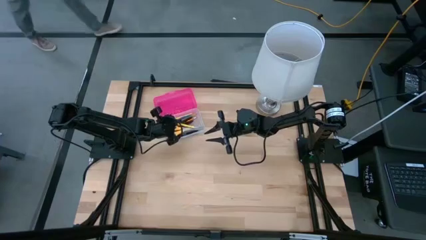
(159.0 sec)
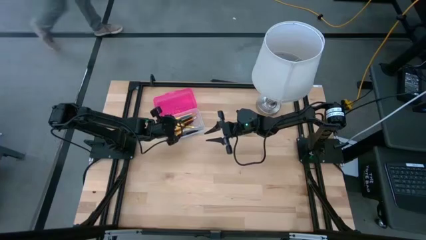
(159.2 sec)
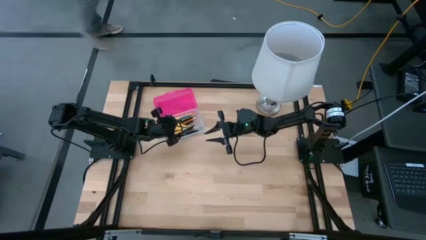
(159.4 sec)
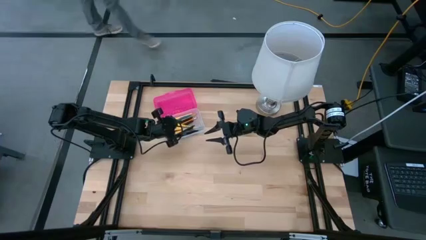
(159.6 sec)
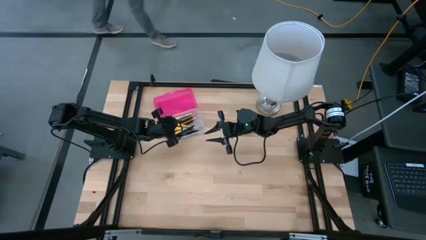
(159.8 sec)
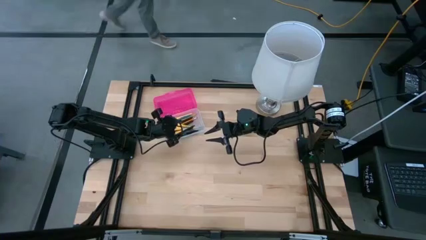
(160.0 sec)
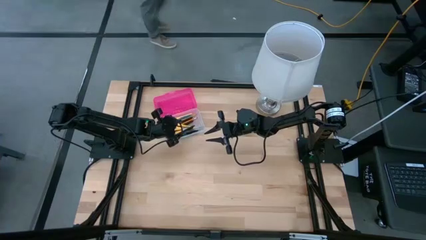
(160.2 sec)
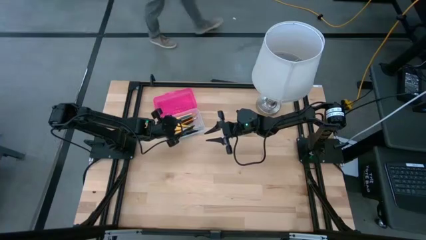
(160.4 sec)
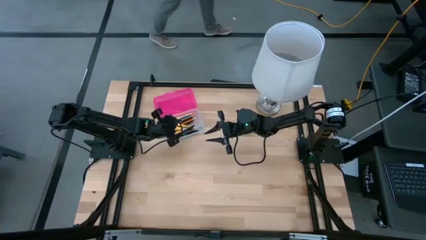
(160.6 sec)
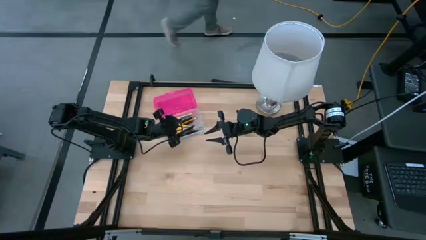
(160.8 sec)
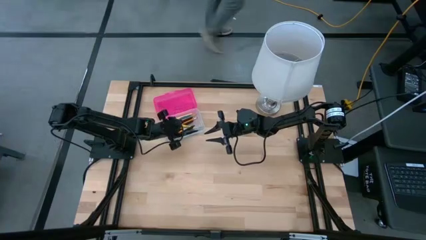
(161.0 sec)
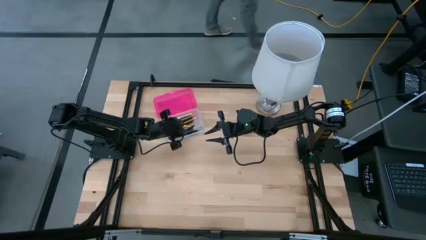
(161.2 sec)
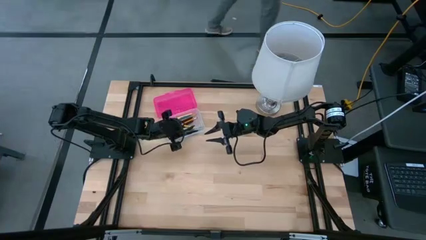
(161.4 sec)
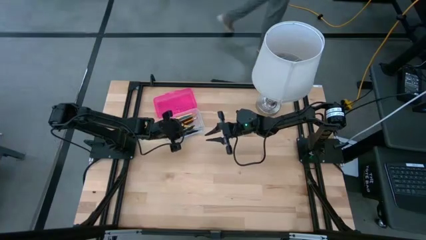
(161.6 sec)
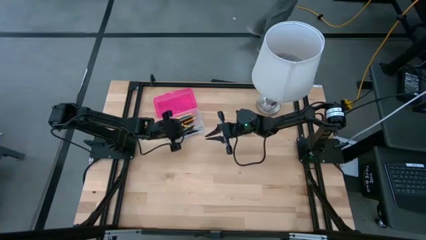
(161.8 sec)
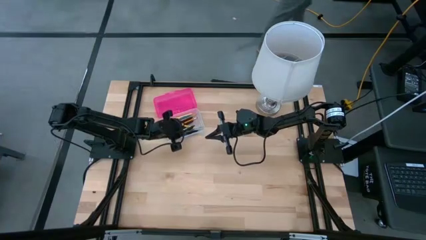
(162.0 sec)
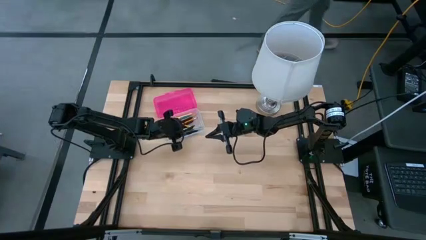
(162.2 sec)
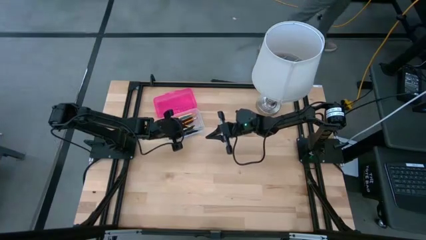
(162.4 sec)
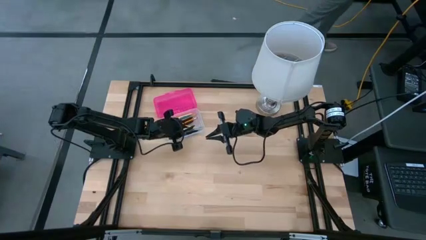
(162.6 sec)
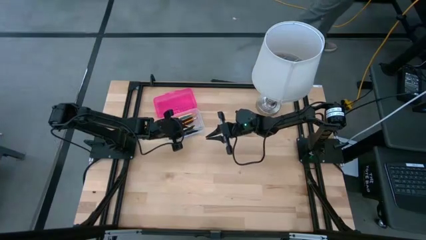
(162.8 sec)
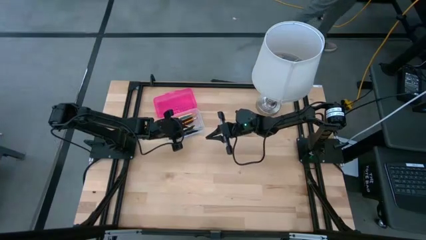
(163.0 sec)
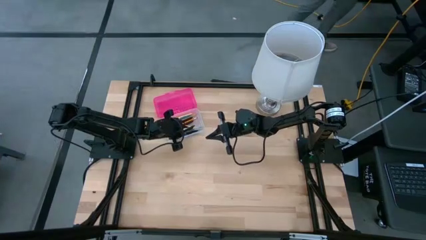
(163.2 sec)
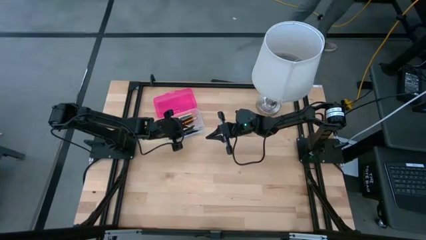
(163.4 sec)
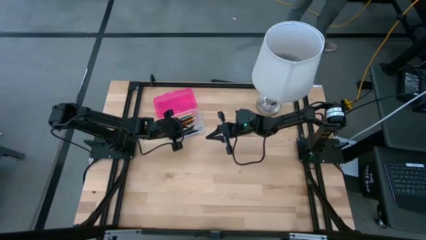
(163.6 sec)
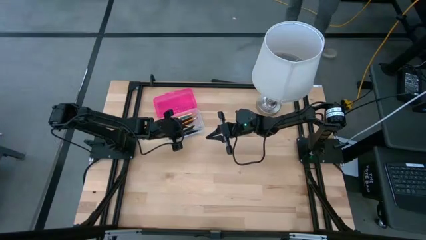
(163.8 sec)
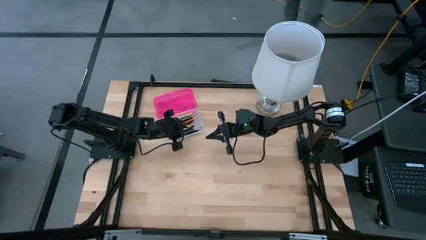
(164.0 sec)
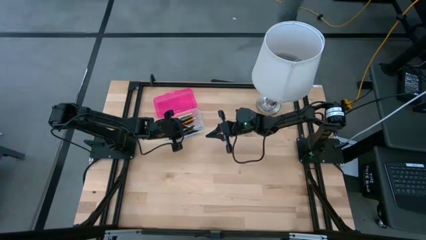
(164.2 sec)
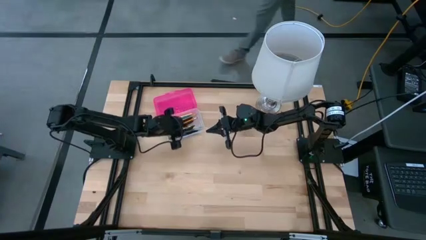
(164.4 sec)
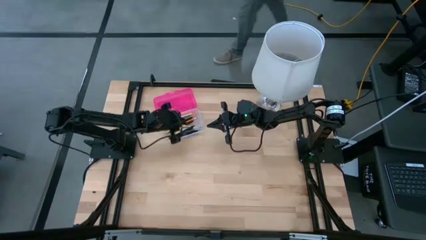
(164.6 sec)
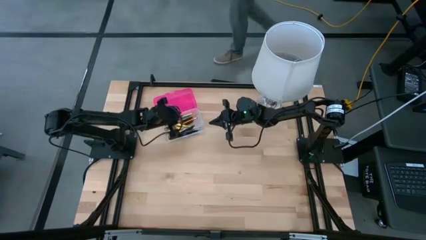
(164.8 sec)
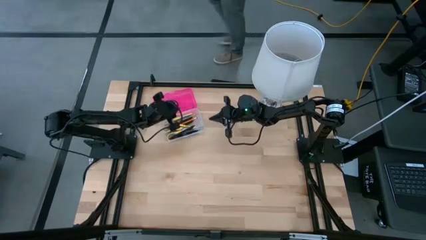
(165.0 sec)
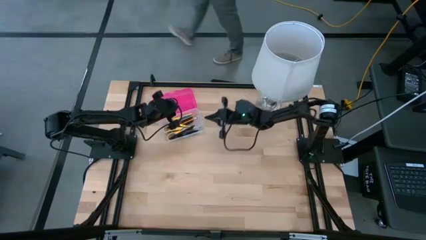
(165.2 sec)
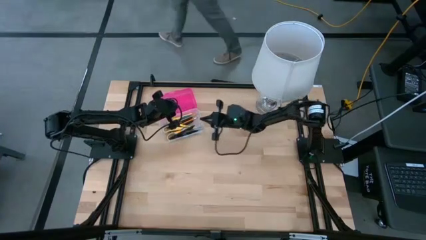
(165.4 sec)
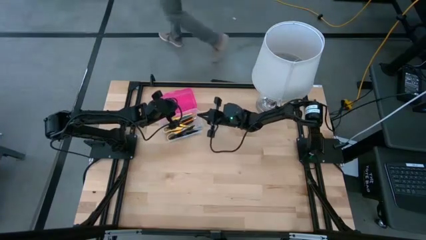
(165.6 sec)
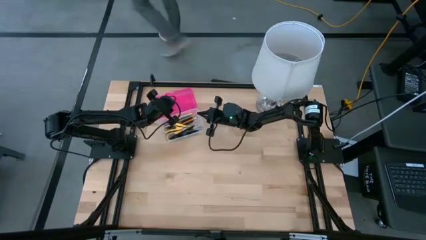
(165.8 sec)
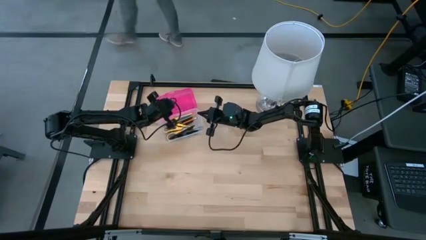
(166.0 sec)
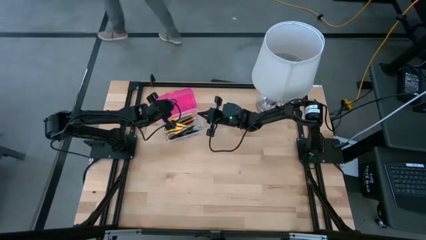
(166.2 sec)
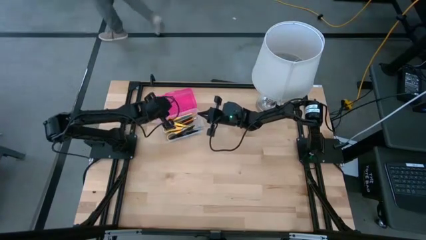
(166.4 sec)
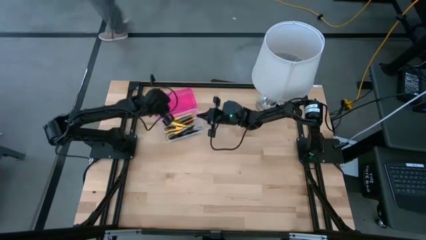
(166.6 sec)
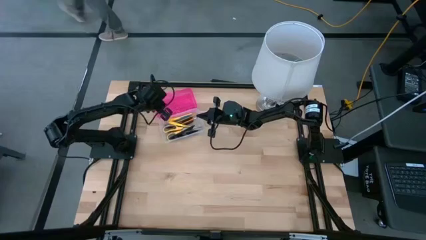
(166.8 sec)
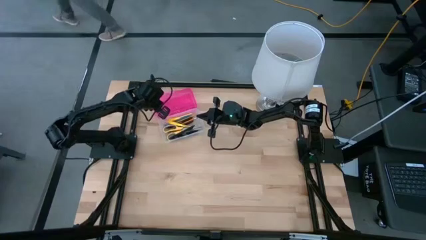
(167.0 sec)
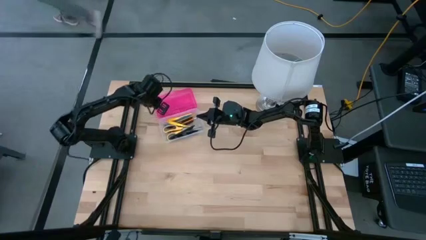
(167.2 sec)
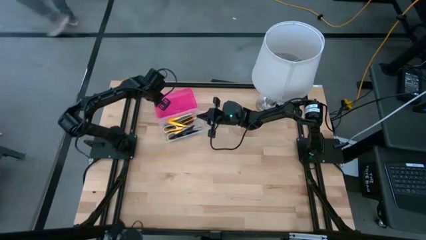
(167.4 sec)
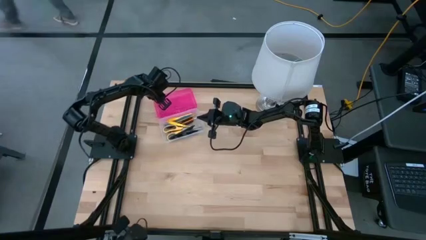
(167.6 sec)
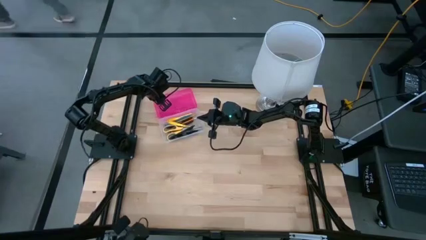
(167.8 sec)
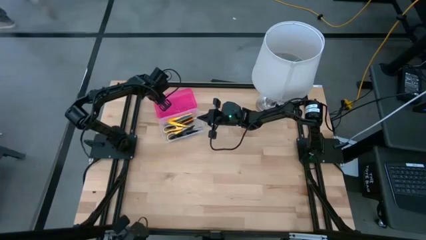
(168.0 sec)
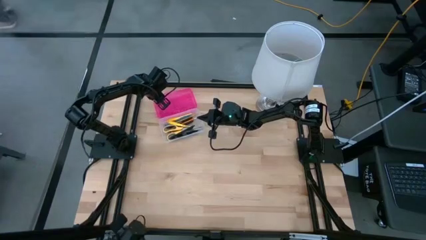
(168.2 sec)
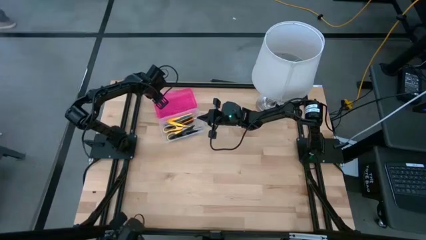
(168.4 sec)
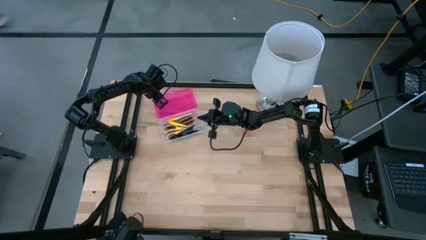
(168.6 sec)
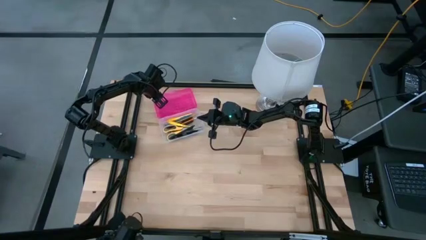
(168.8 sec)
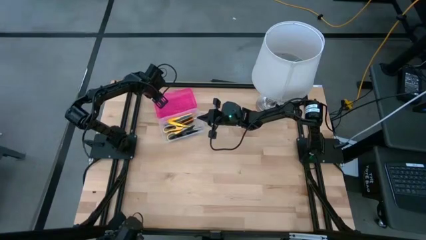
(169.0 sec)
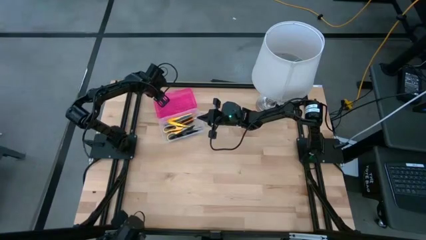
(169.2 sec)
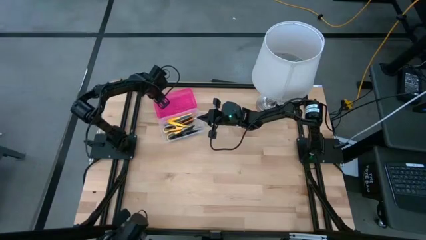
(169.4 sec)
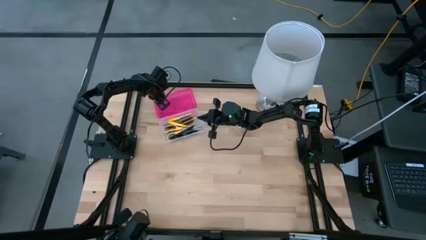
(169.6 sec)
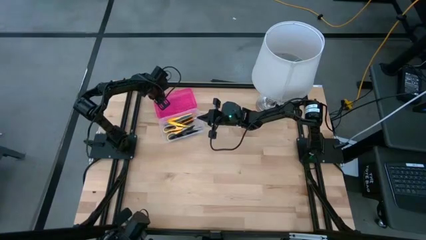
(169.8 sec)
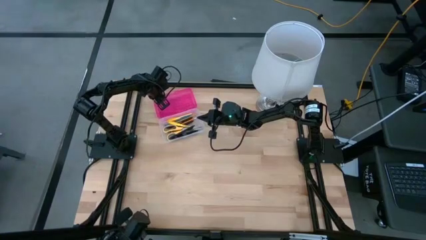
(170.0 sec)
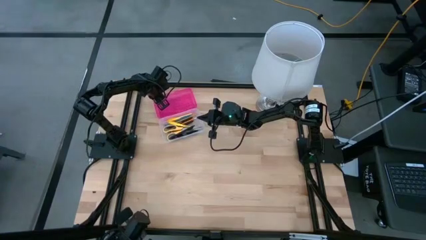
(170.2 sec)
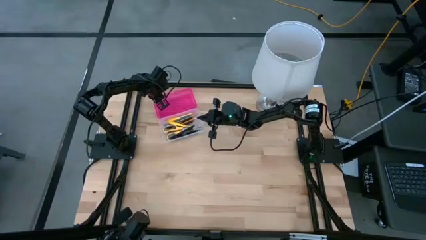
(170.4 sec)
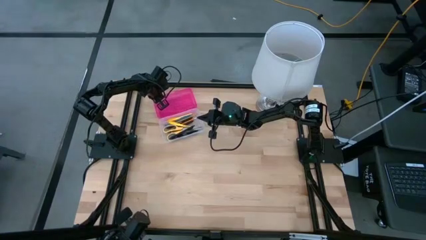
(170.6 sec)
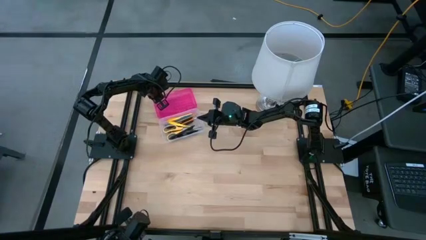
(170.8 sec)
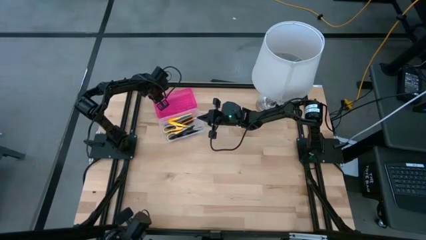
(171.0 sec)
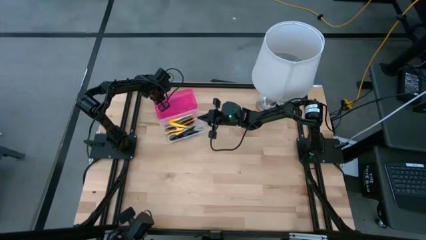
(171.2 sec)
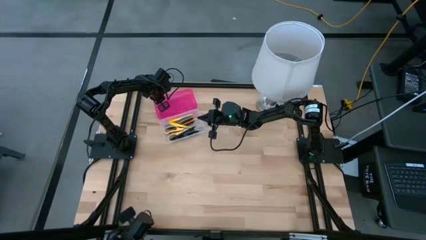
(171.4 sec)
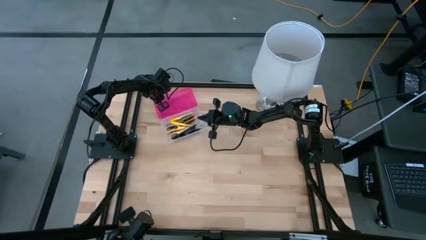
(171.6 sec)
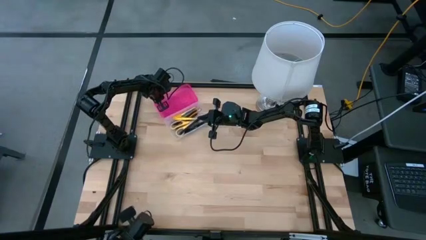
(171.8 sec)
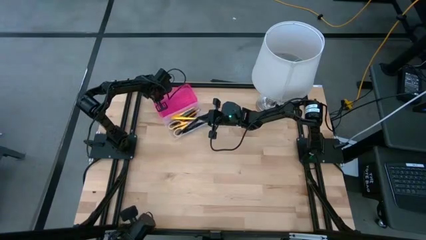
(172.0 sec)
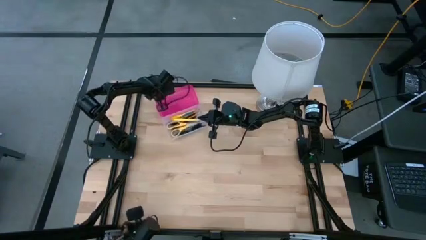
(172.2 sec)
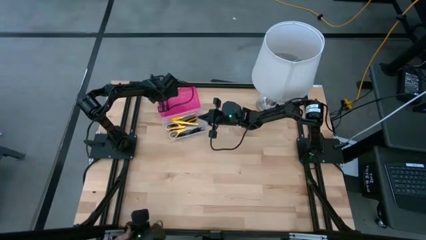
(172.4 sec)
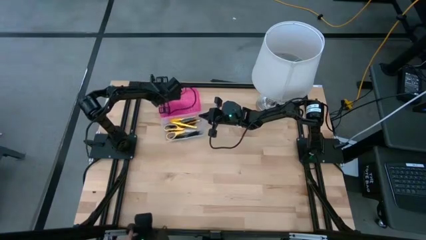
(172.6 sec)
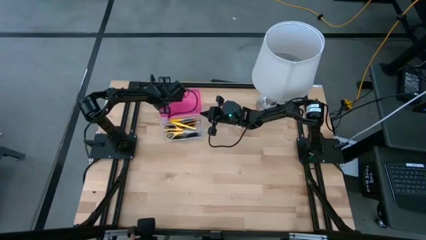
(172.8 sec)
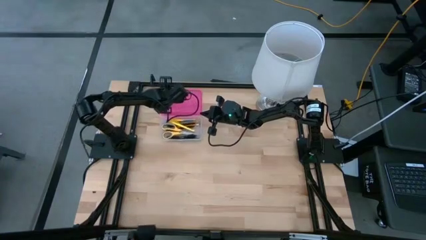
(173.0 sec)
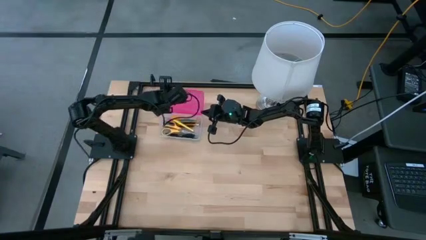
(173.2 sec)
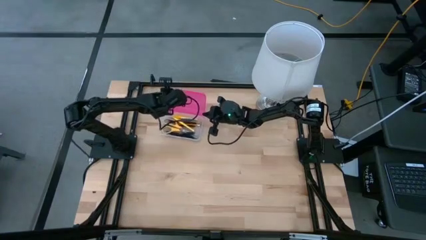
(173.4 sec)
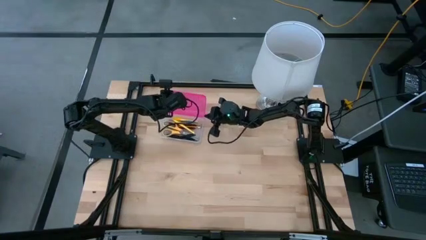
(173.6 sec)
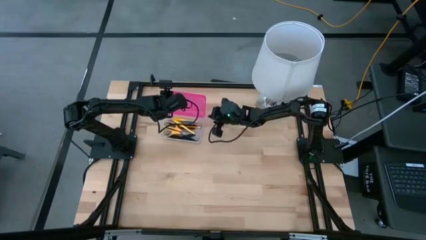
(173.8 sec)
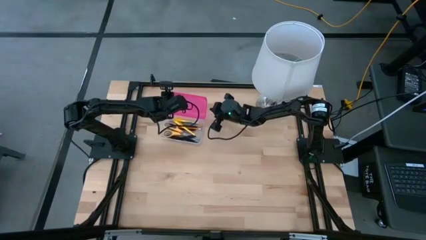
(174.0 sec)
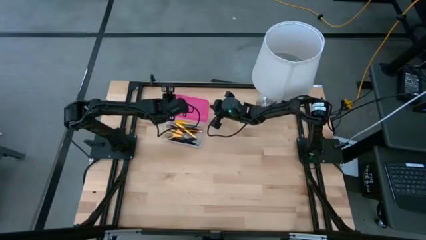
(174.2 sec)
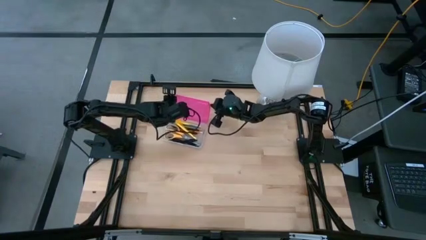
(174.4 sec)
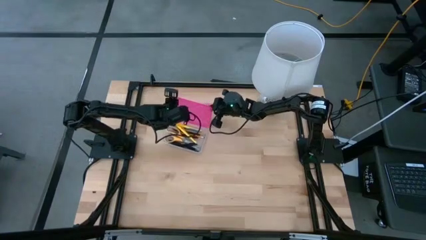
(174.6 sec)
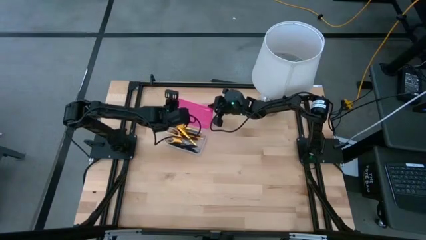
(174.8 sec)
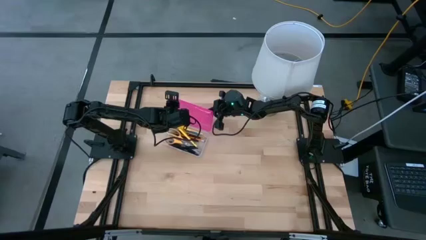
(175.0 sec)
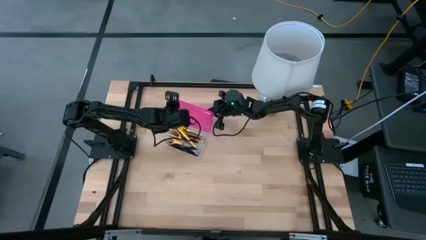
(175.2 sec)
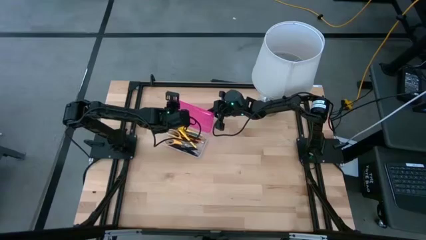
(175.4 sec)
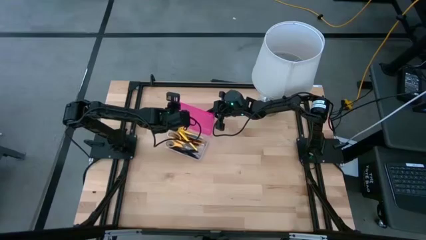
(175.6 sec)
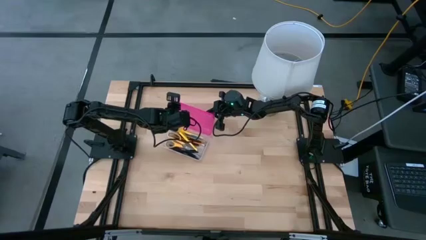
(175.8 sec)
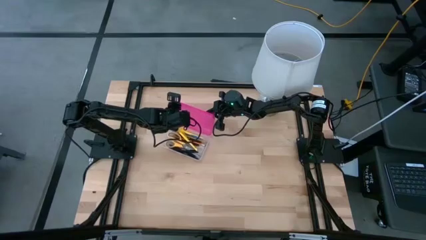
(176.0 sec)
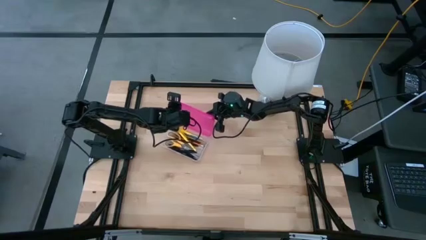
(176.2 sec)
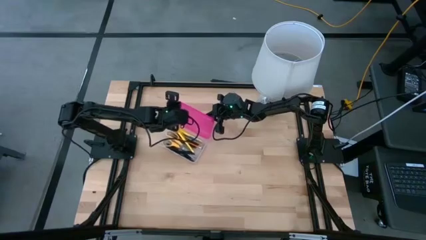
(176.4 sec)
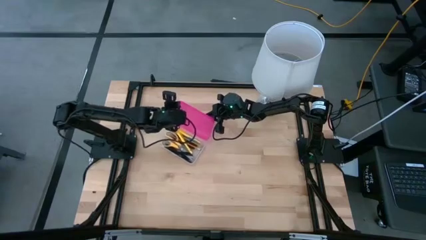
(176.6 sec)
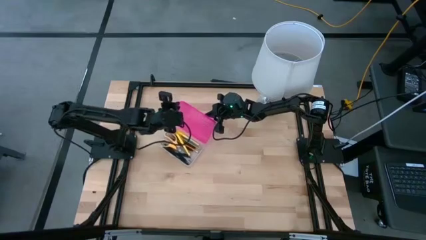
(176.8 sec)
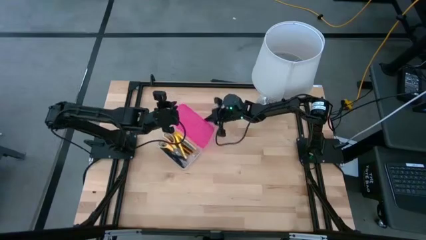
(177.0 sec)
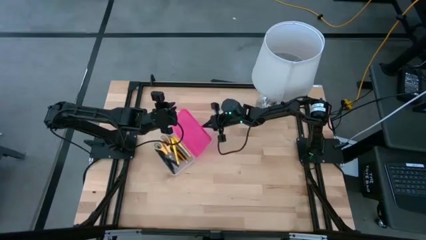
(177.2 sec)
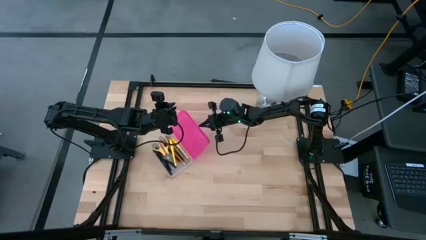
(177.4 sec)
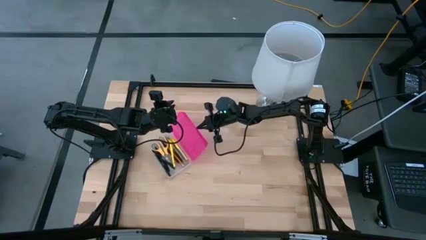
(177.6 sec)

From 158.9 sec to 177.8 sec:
Task: Pick & place school supplies into a supply box
Close the pink supply box
